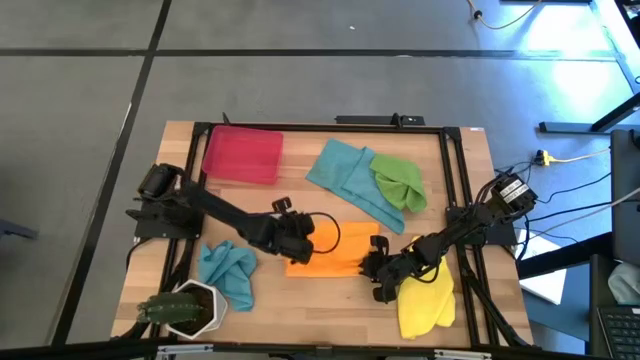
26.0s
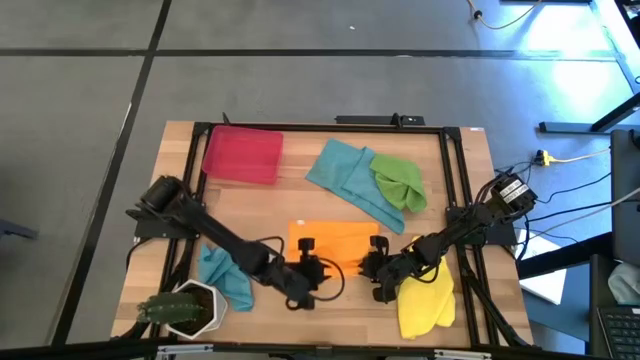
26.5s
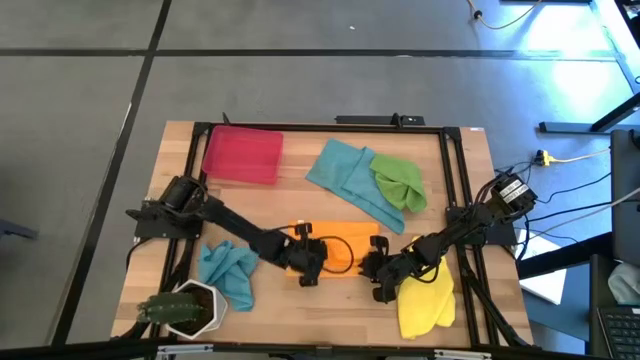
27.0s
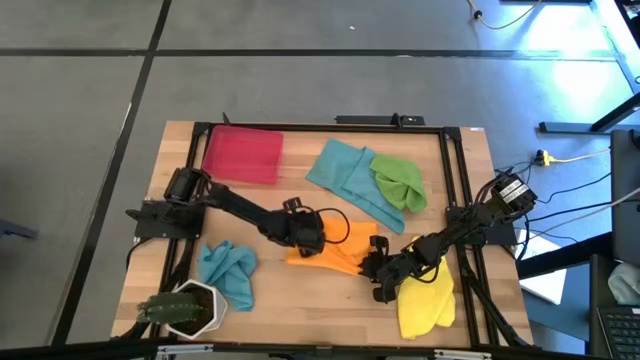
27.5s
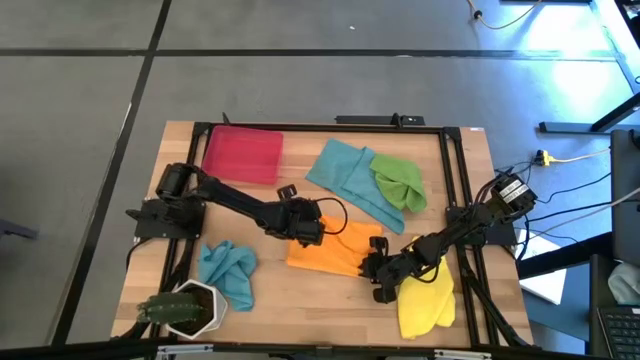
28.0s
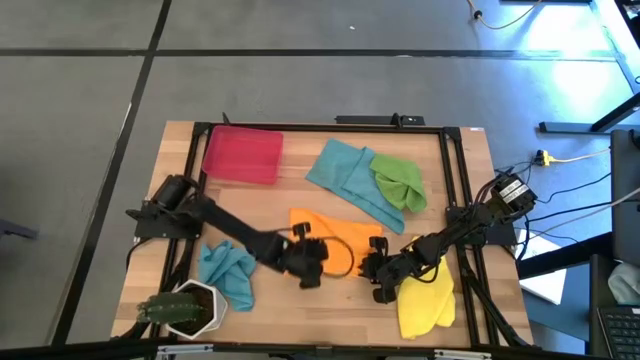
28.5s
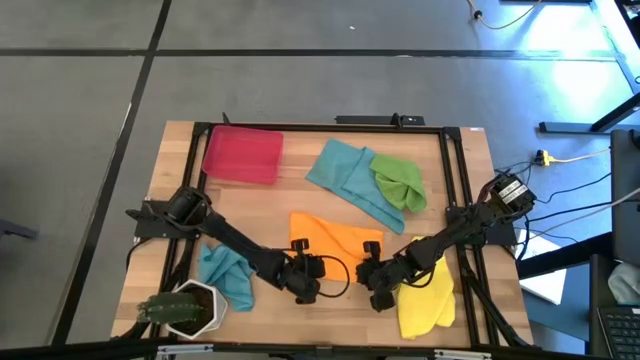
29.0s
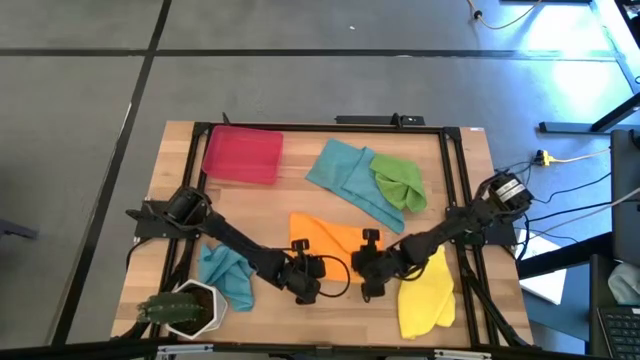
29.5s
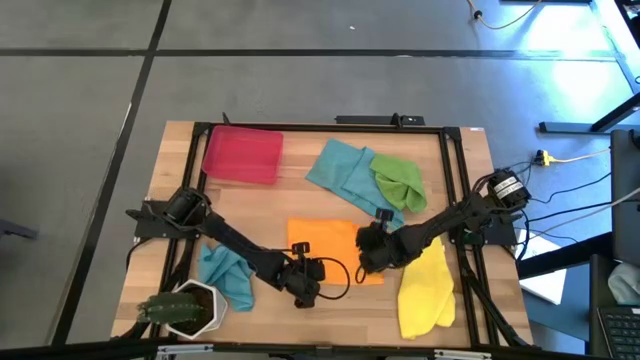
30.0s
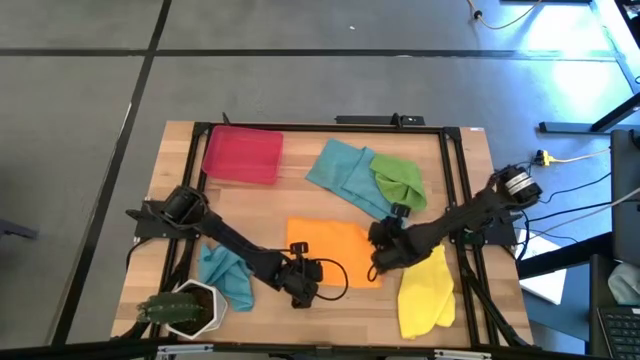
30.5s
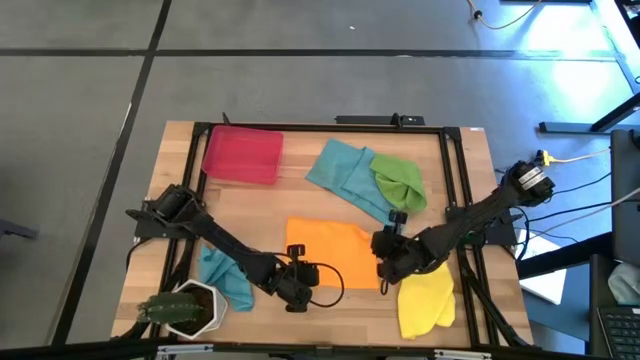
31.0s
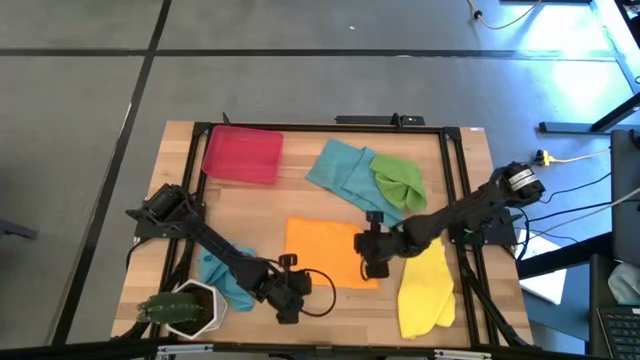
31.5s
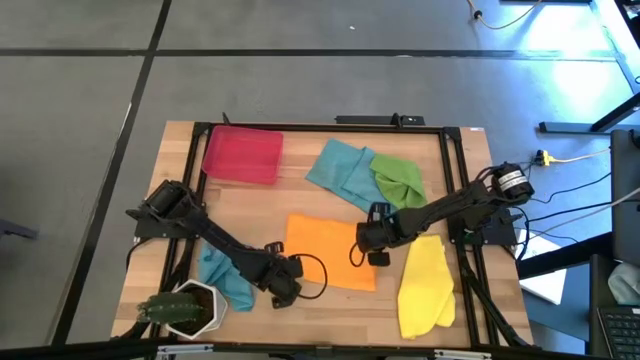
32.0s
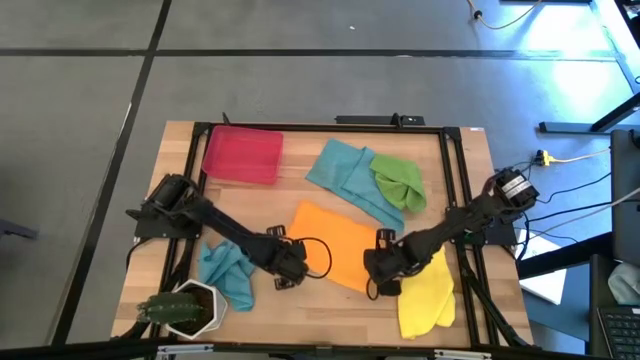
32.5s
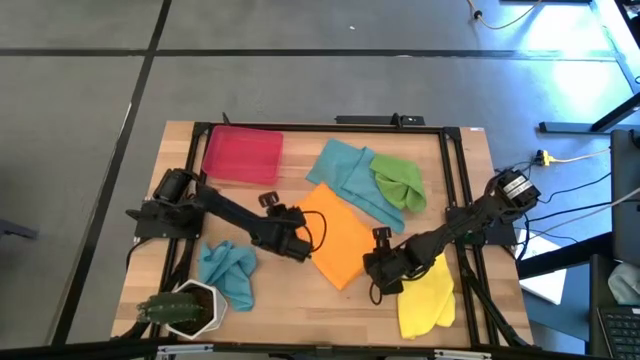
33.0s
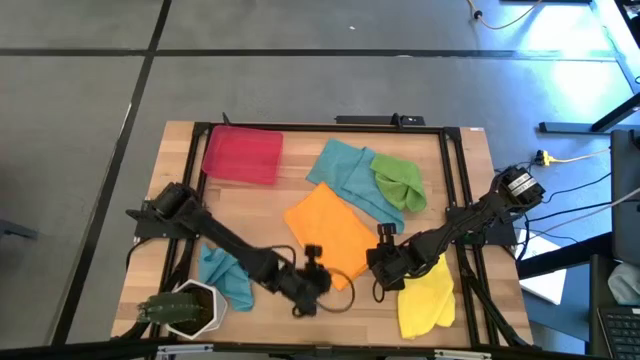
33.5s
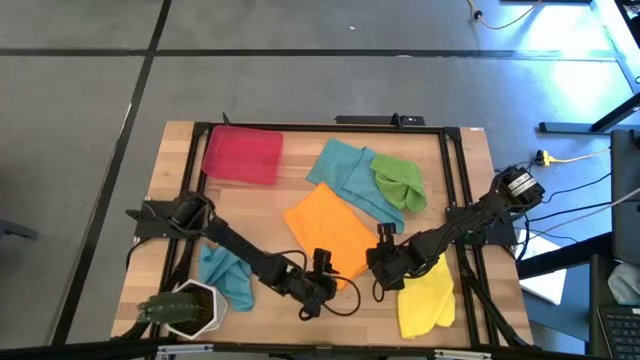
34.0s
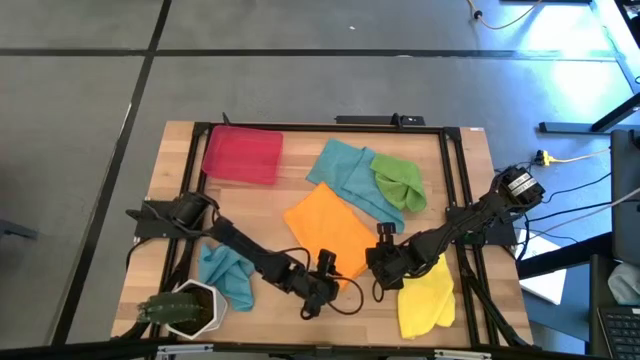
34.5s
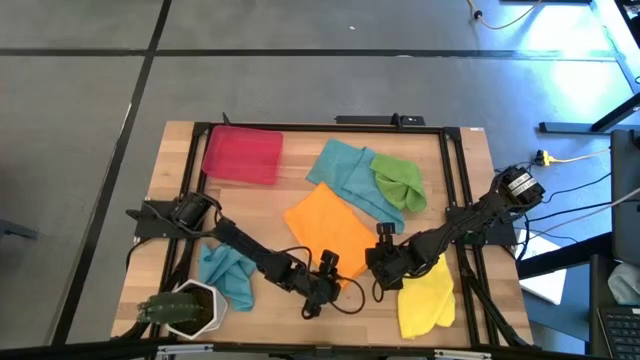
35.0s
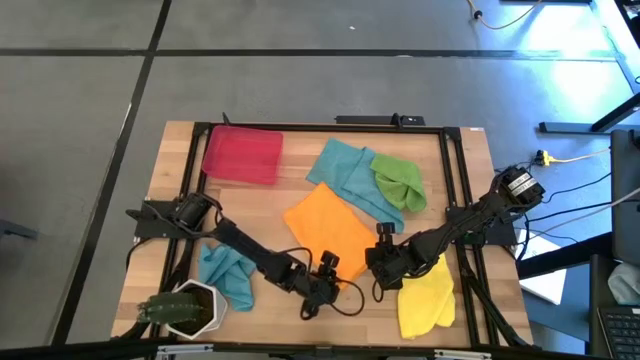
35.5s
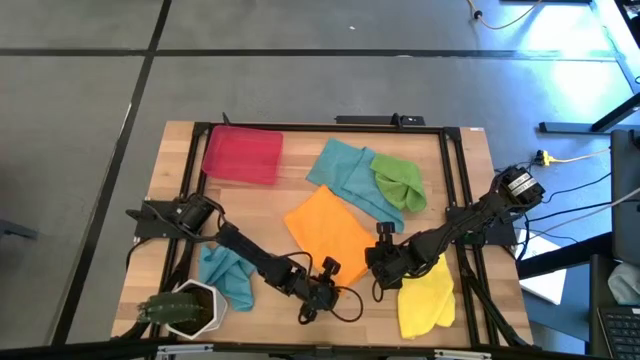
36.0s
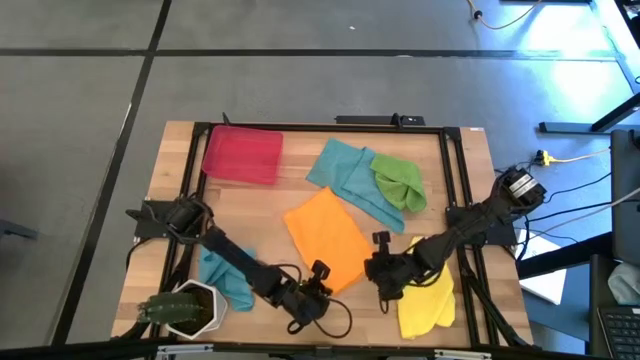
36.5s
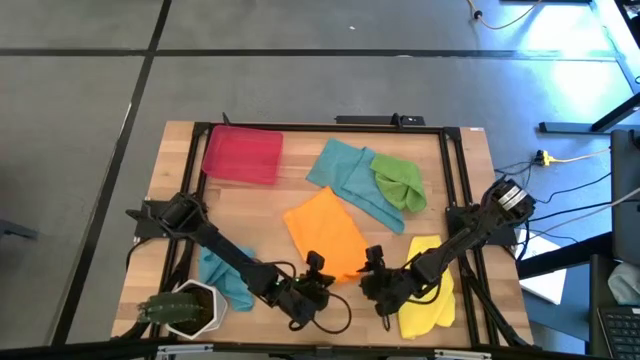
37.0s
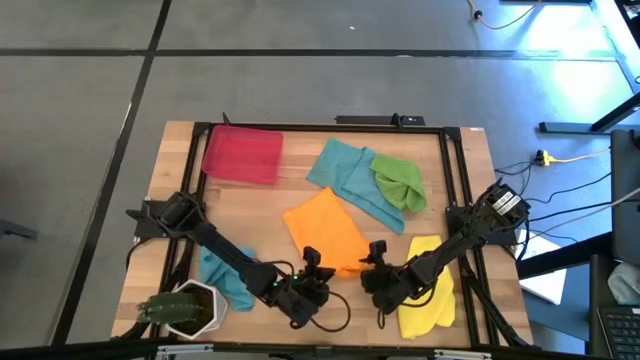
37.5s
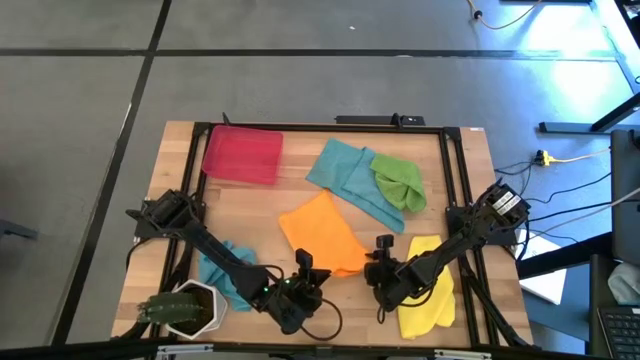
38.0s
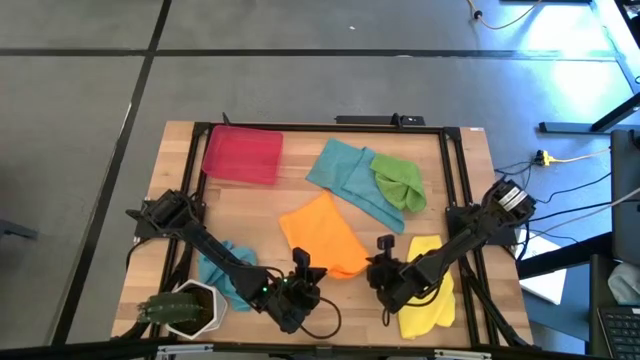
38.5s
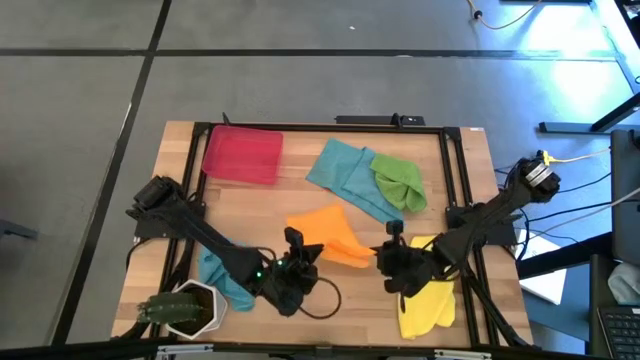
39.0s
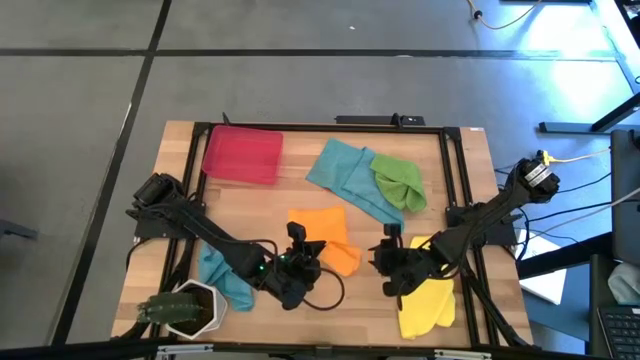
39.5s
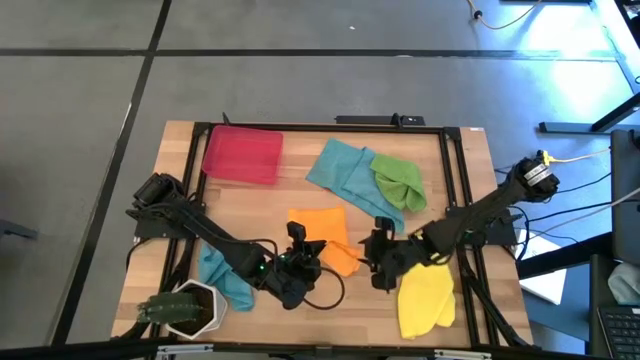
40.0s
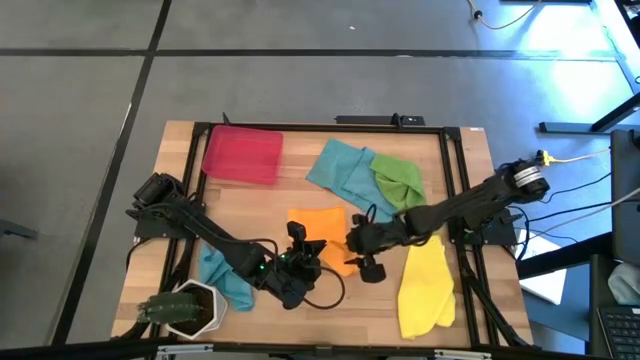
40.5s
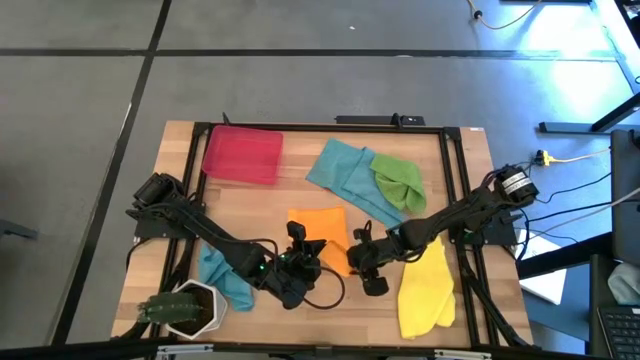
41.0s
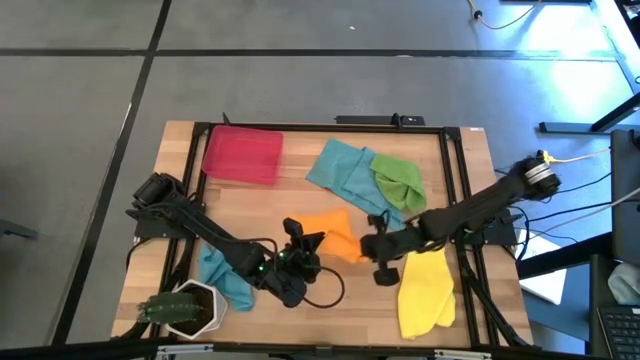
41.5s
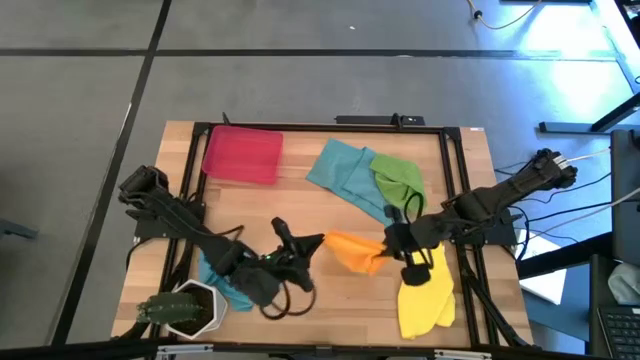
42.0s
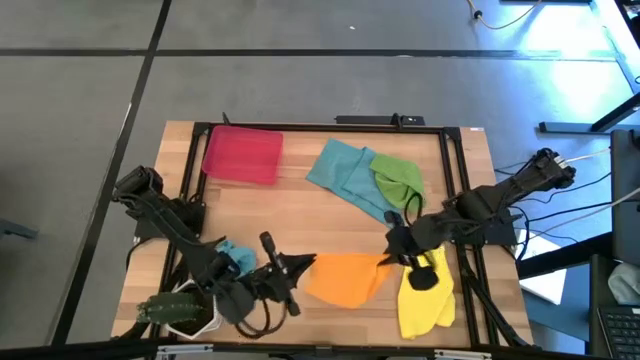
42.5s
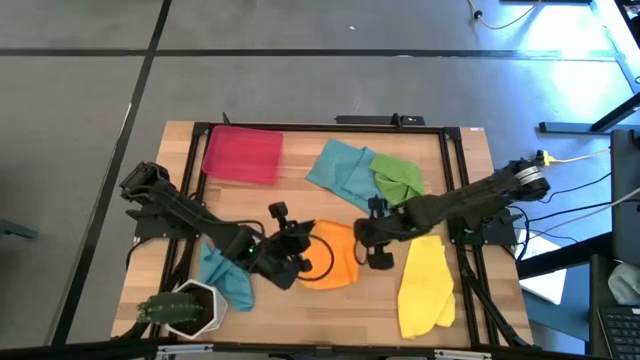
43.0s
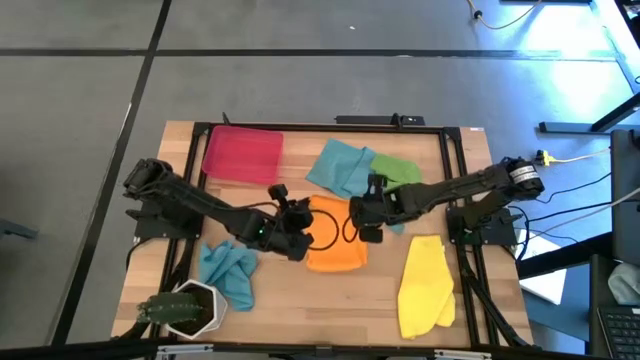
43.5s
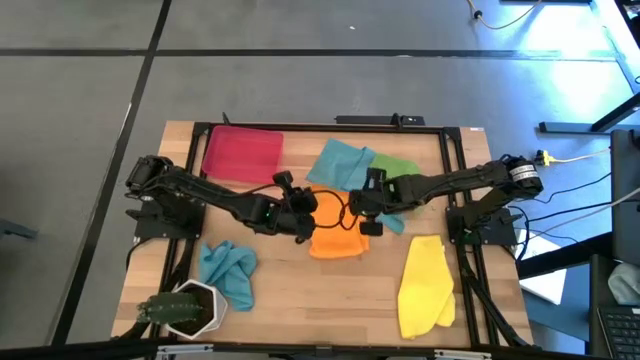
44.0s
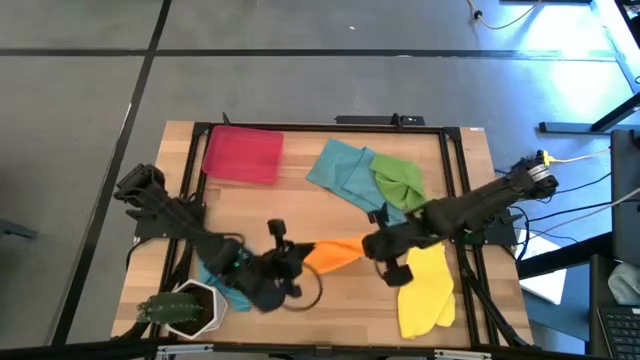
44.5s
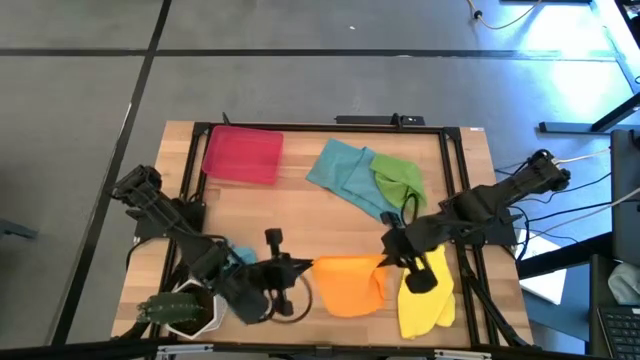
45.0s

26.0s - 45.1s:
Task: Roll microfiber towels into tight, uniform cylinder then place into a basket
Fold the orange microfiber towel

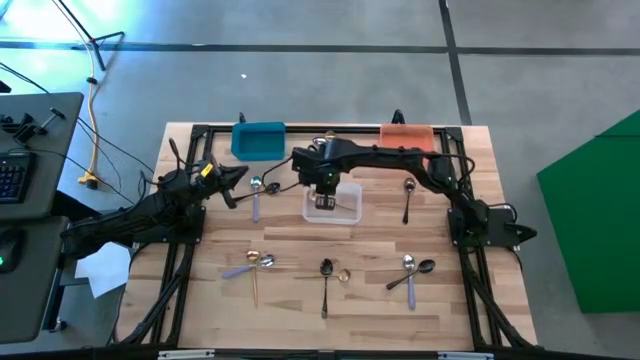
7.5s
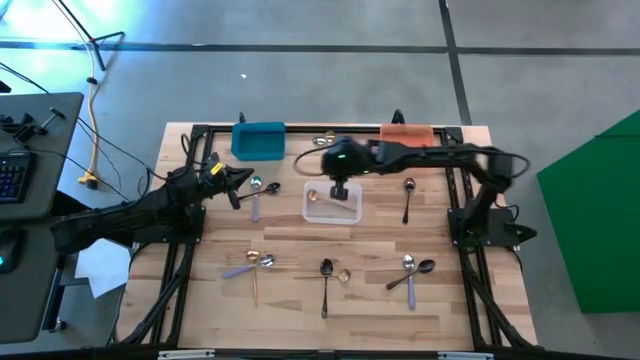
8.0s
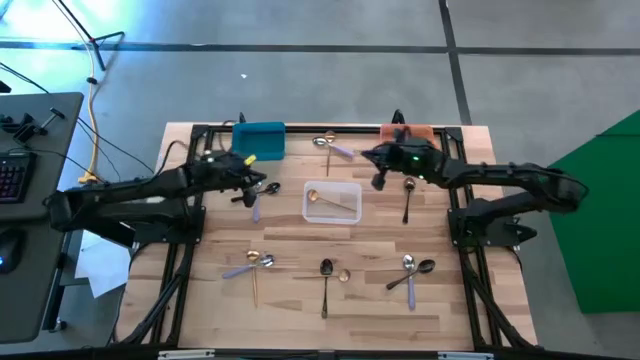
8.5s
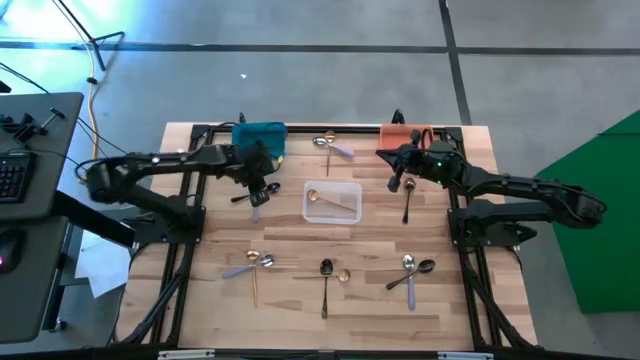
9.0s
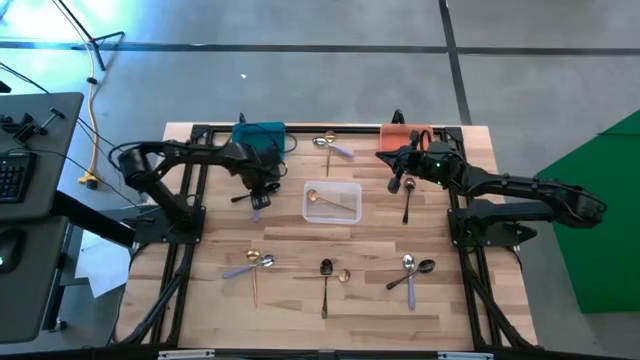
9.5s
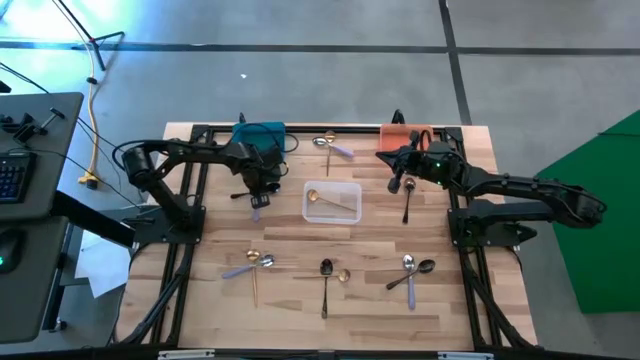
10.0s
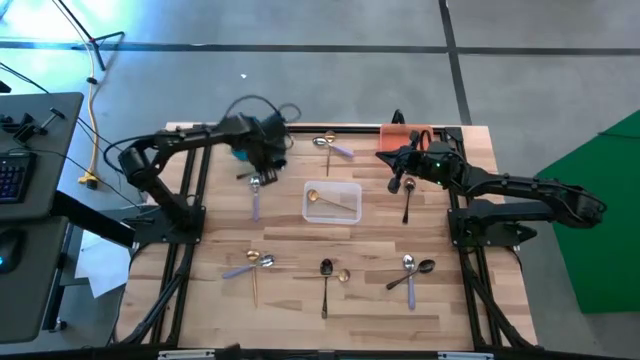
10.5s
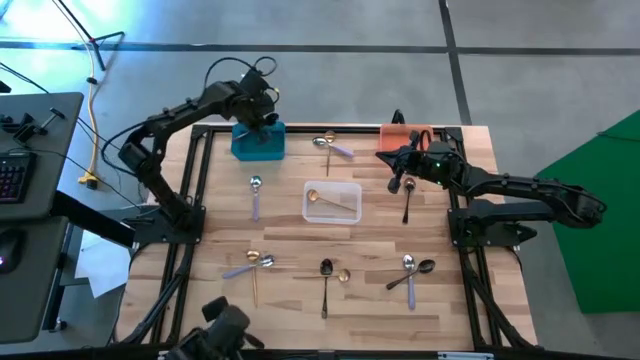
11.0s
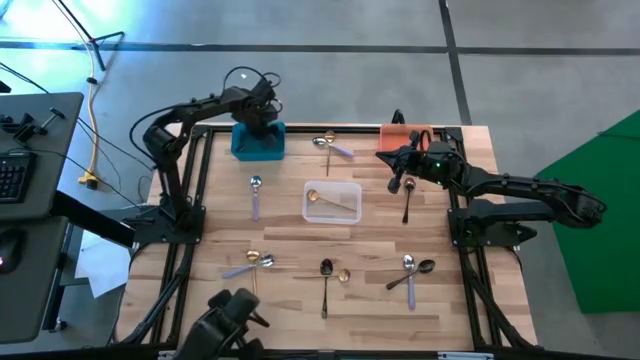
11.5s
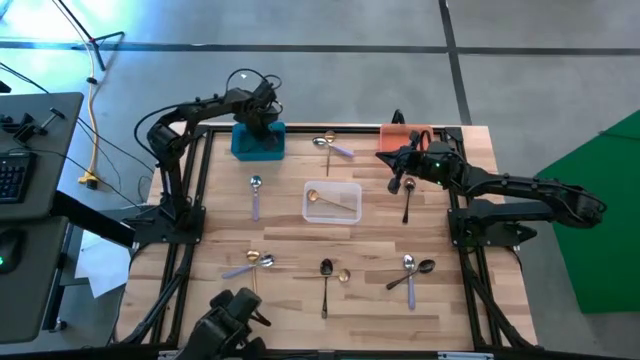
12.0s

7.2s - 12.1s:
Task: Sort silverware by color (type)
Put the black spoon into the blue bin
